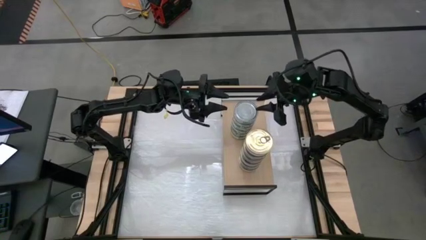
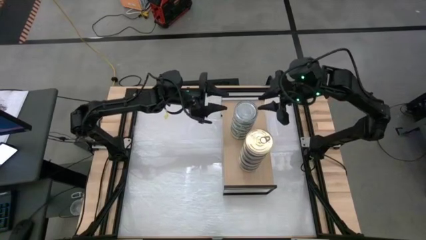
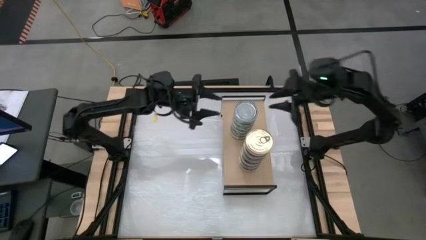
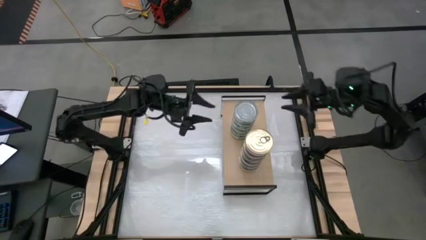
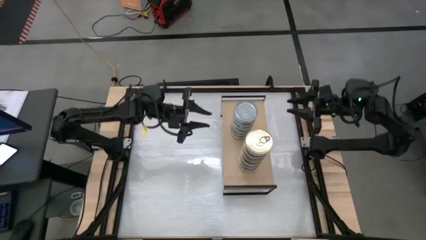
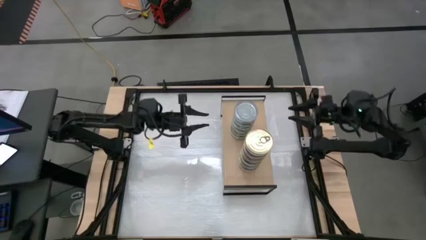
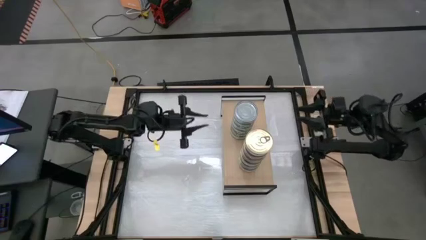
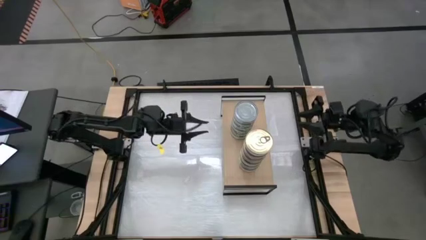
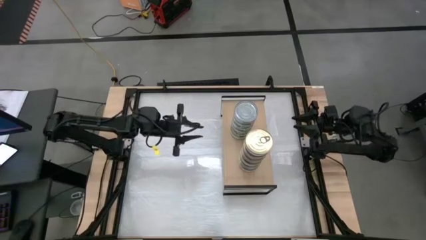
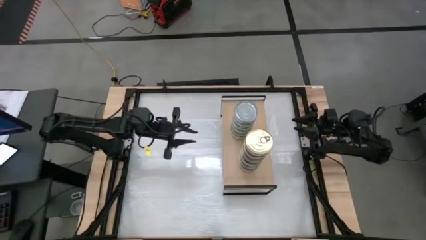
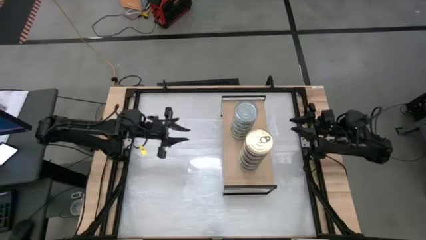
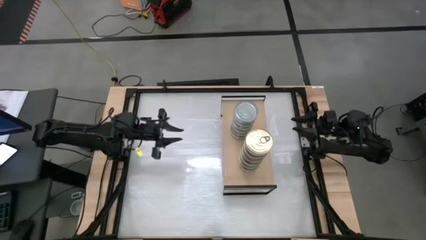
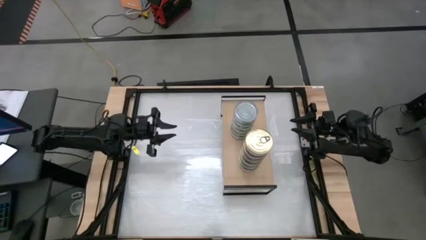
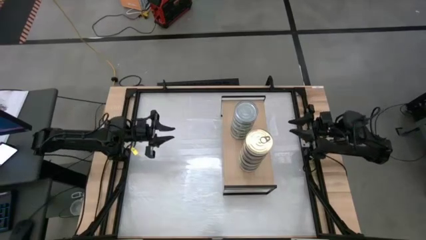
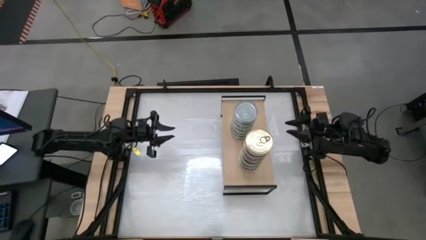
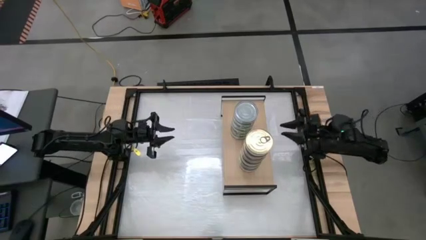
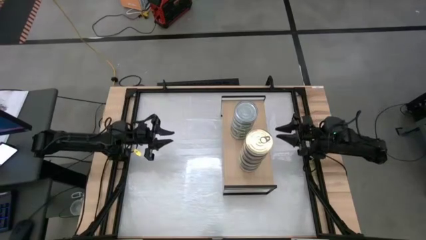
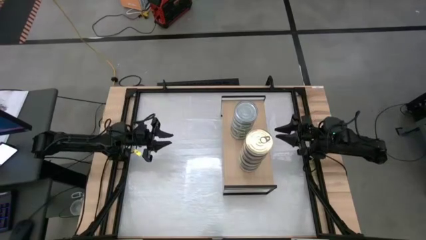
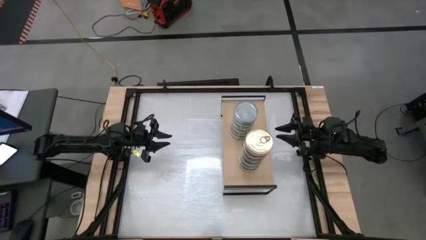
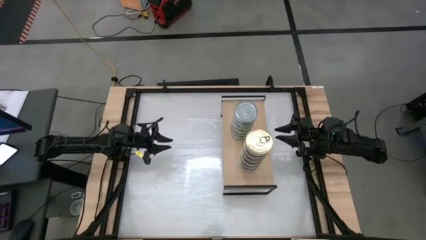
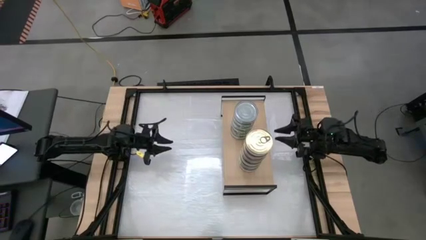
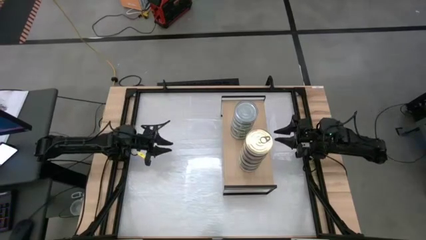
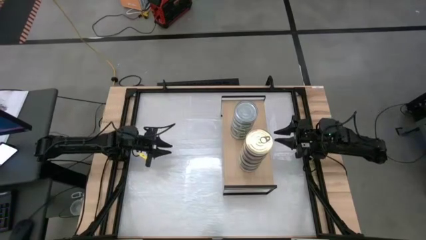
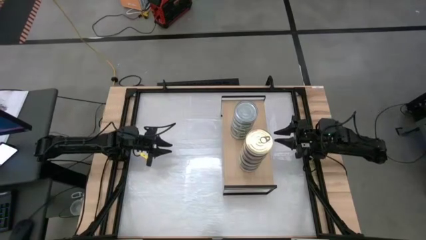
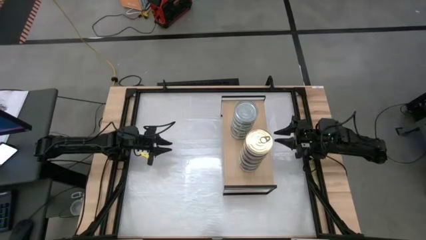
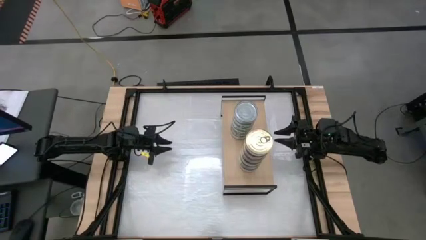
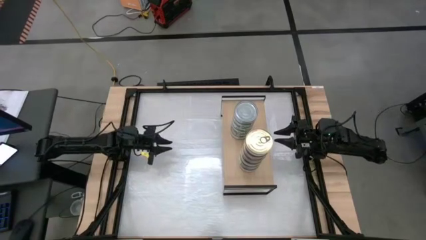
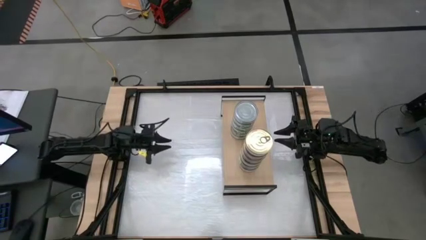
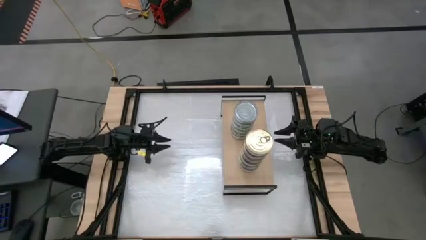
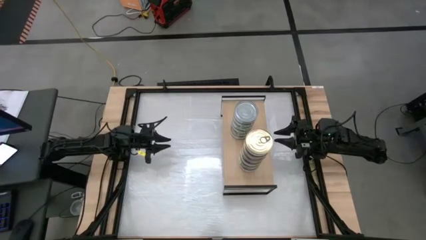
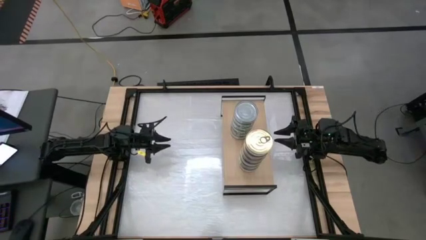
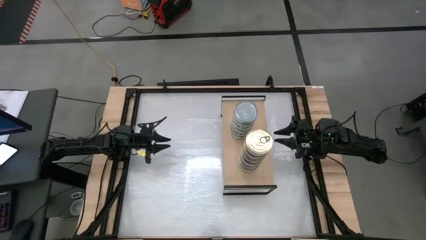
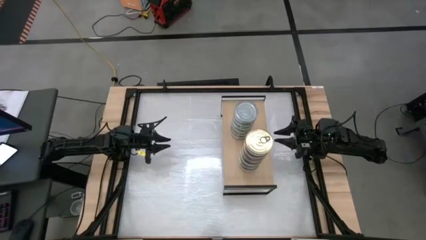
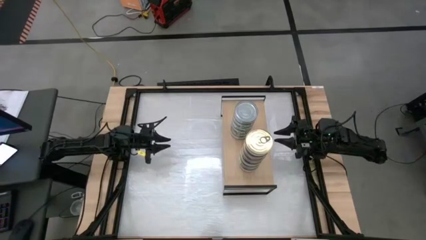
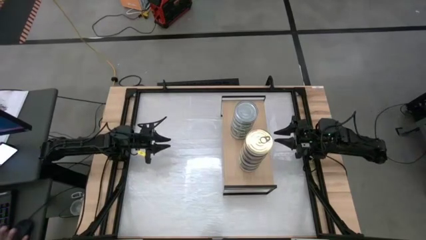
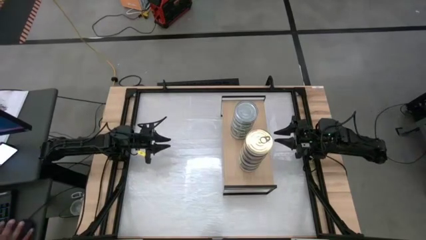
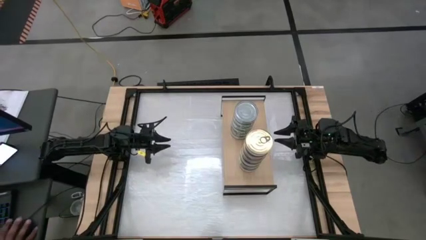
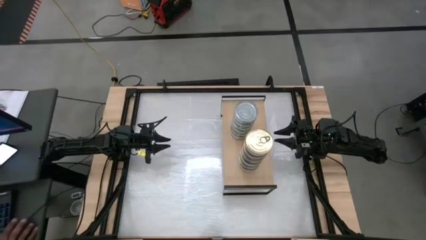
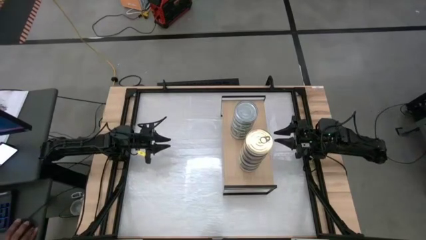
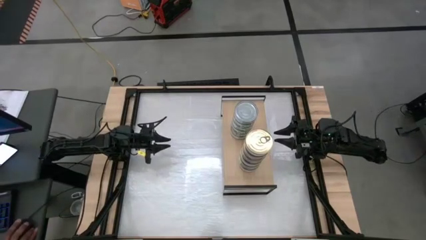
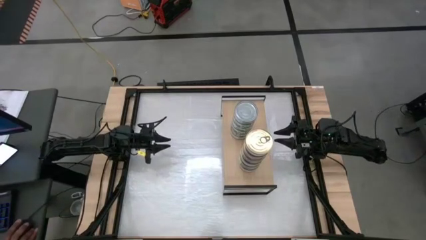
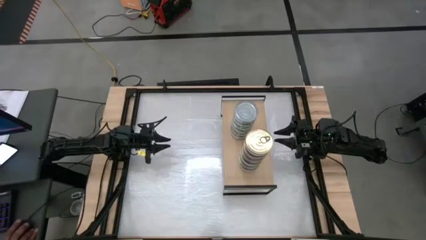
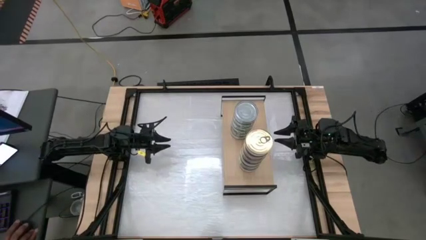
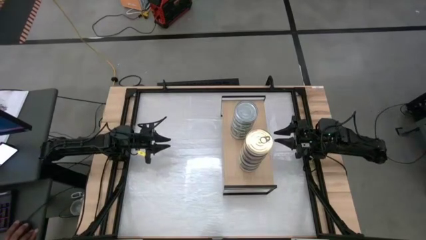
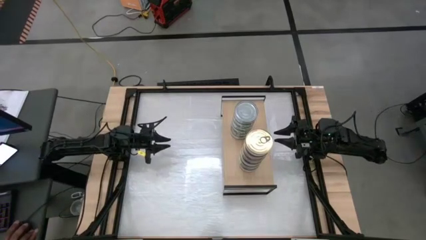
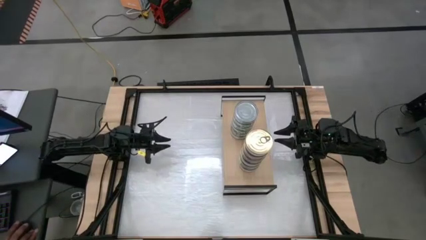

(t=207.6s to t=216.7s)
Task: Stack canned seafood by type on shelf
Return to Home Position

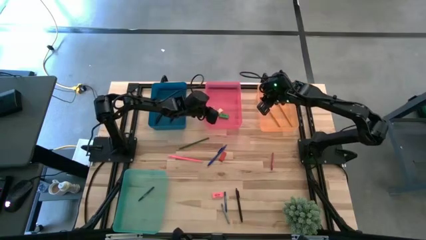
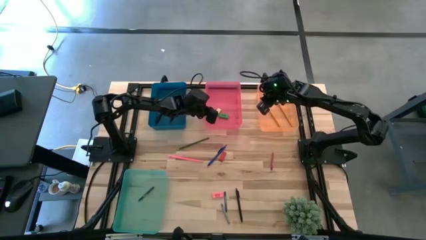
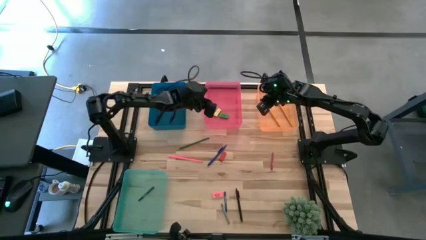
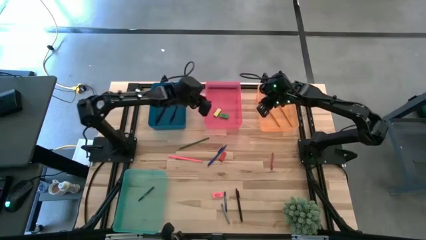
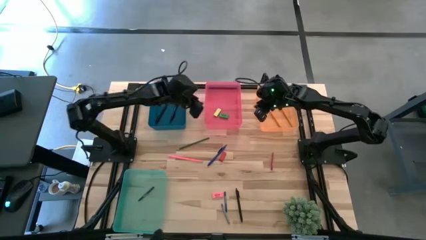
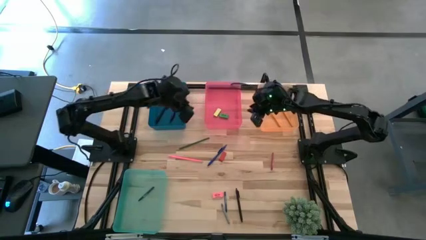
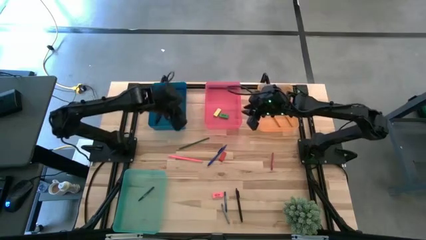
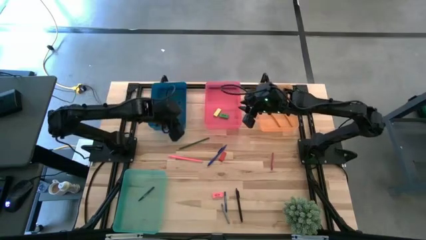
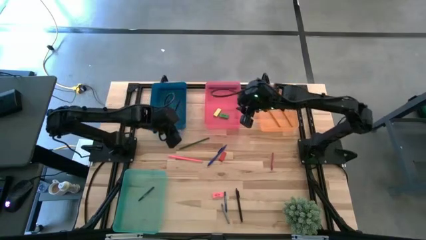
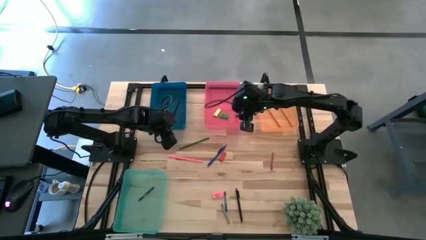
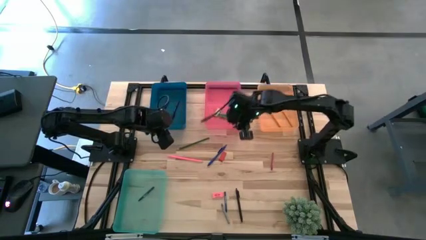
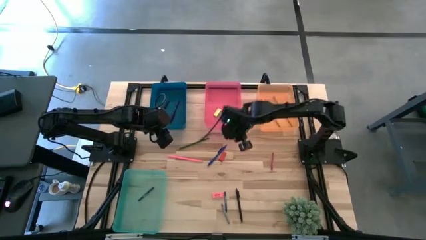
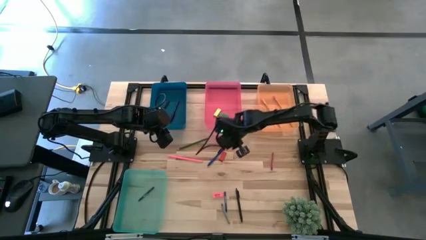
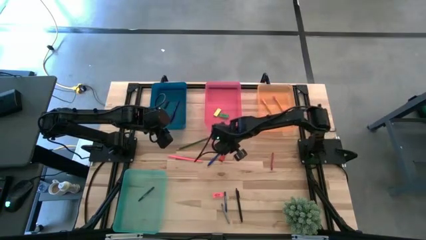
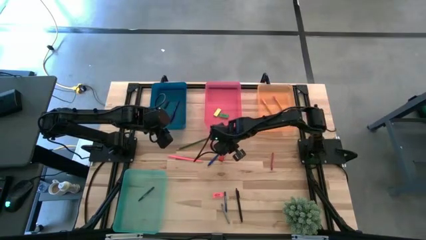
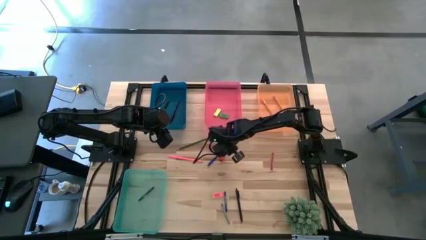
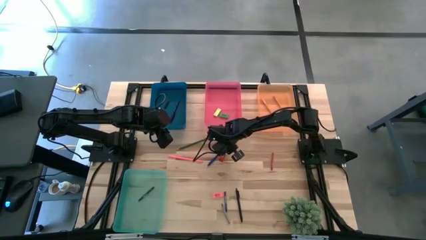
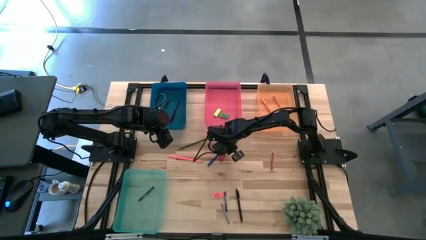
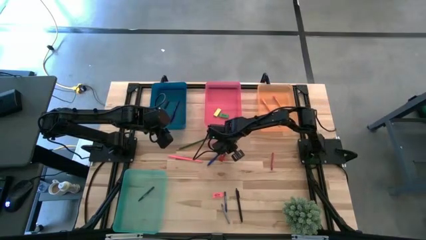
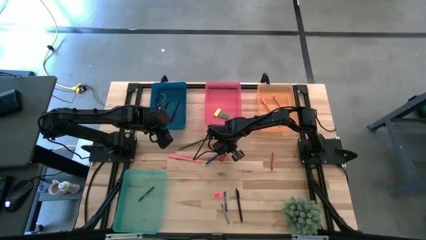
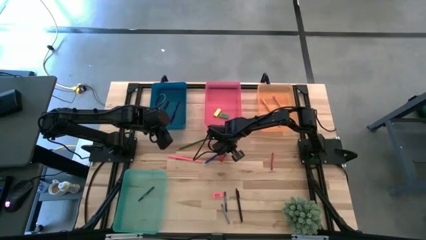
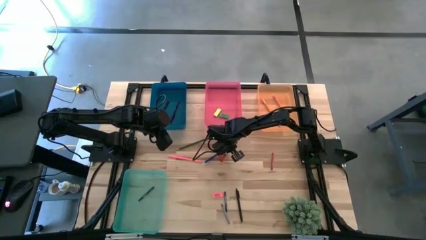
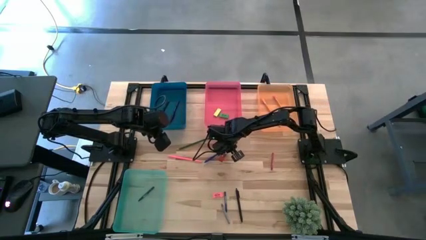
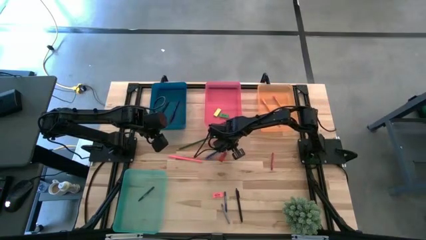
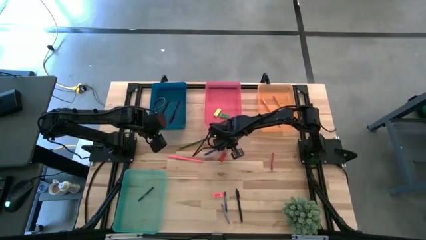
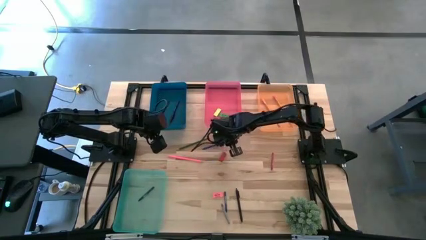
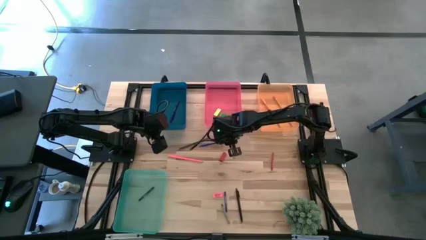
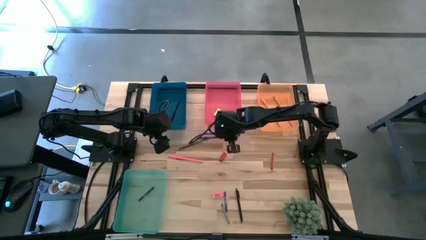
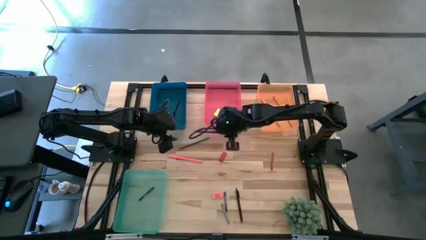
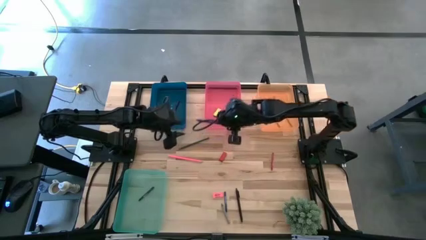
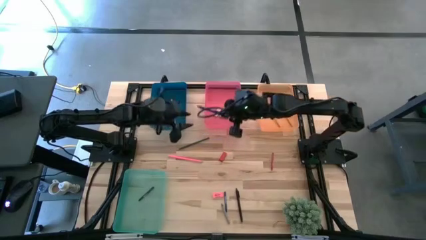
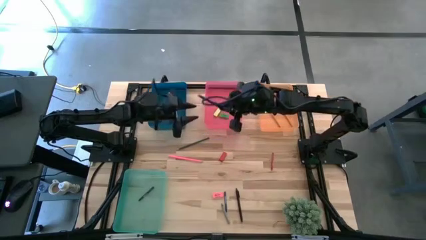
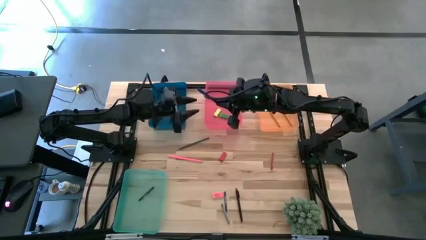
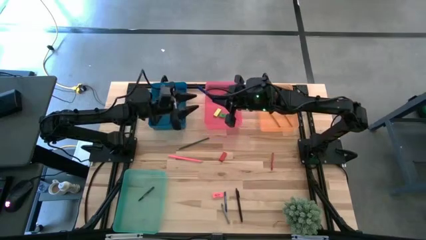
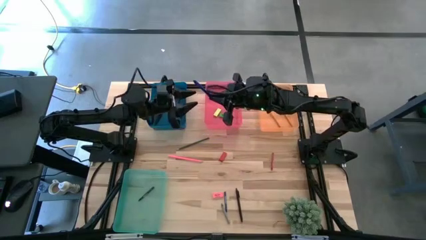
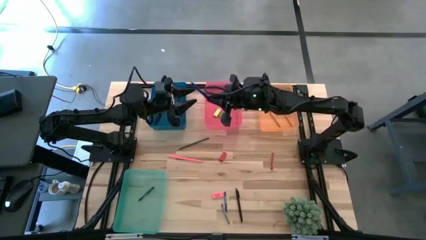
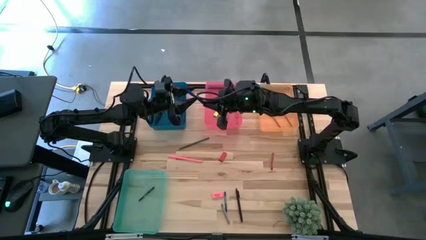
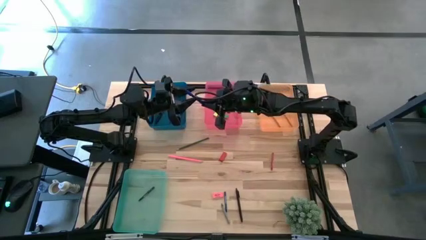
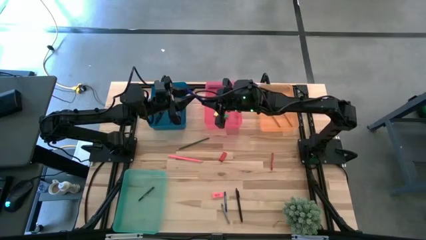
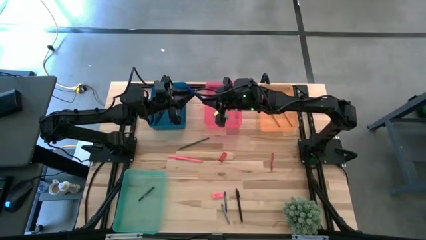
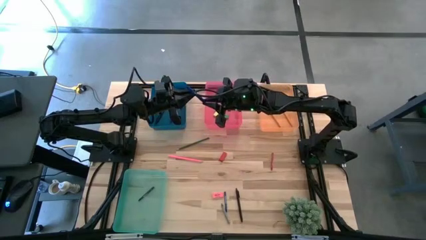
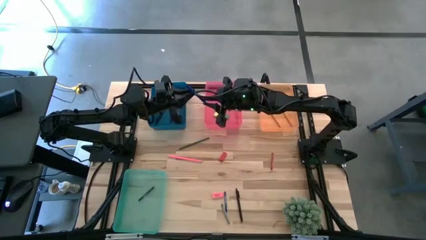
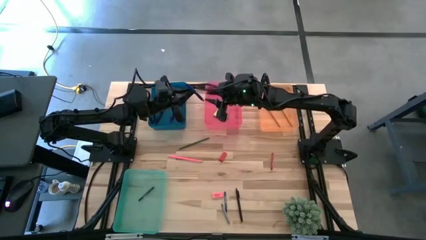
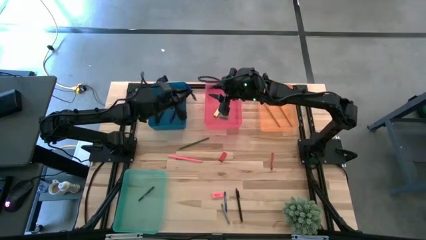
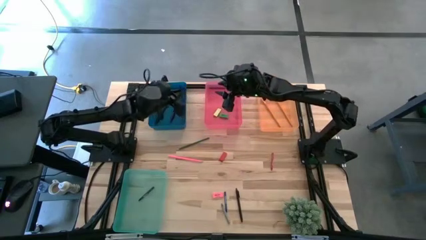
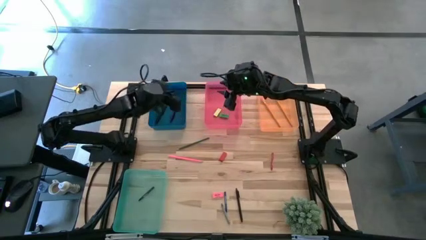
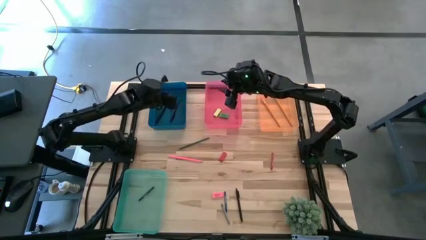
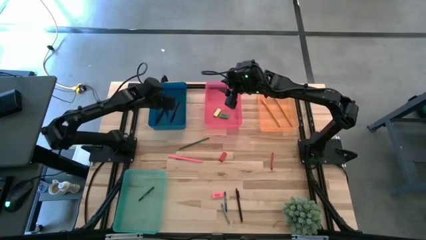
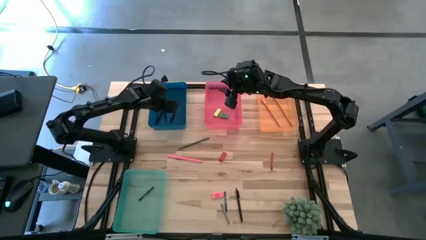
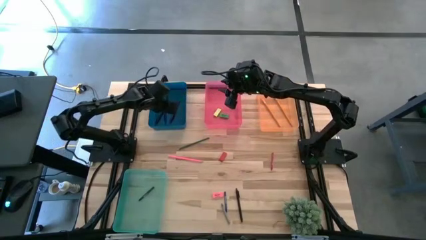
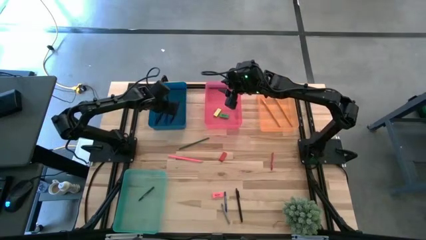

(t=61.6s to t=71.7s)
Task: Sort crayons/erasers/pens/pencils in bins
Put the blue pen into the blue bin
